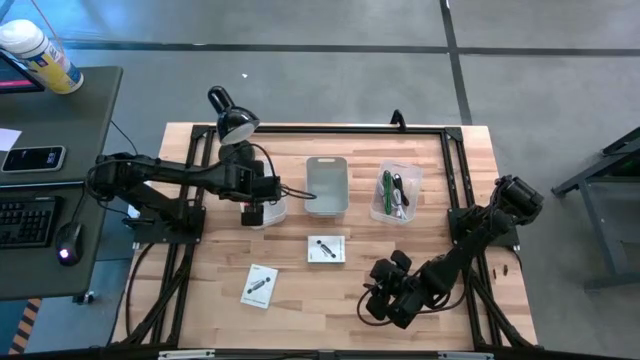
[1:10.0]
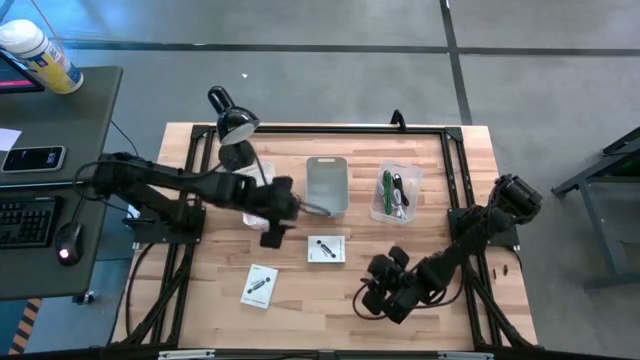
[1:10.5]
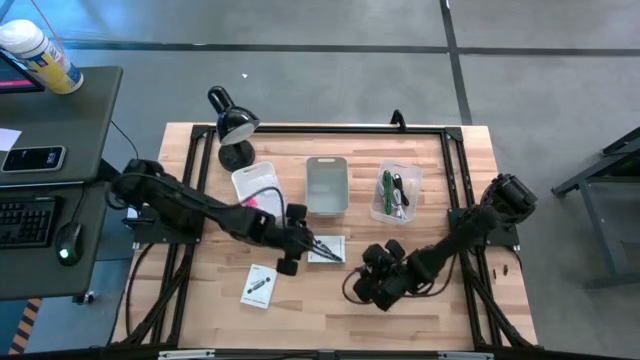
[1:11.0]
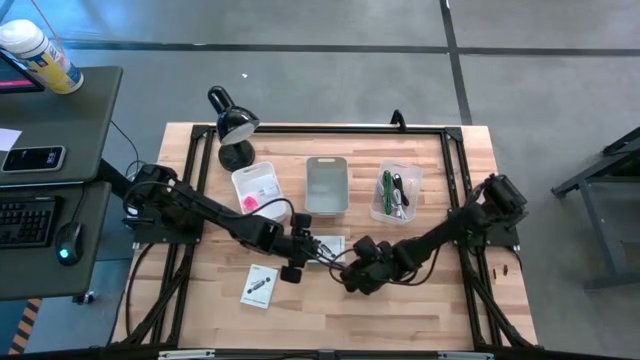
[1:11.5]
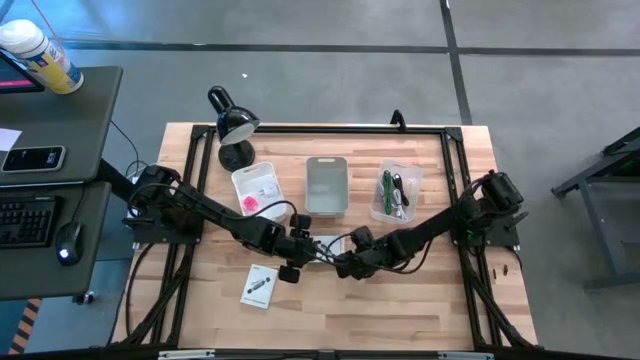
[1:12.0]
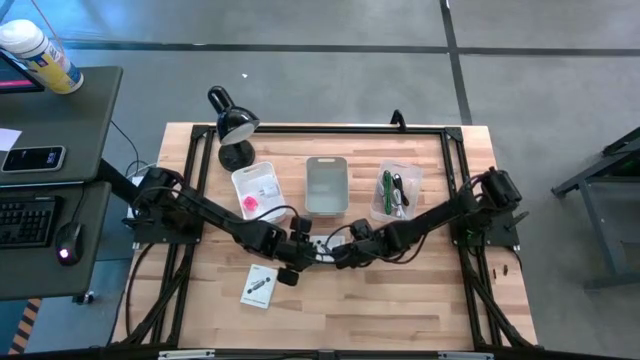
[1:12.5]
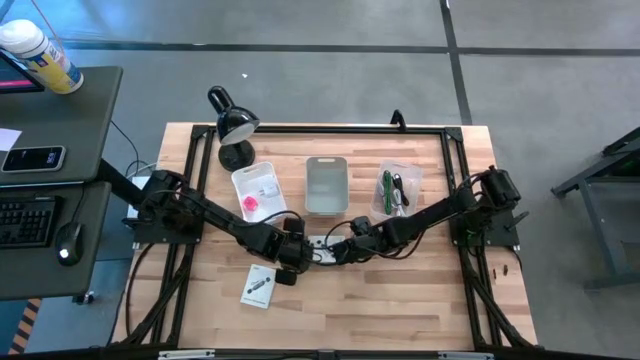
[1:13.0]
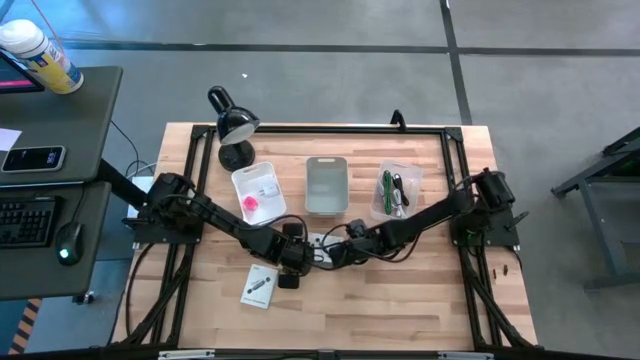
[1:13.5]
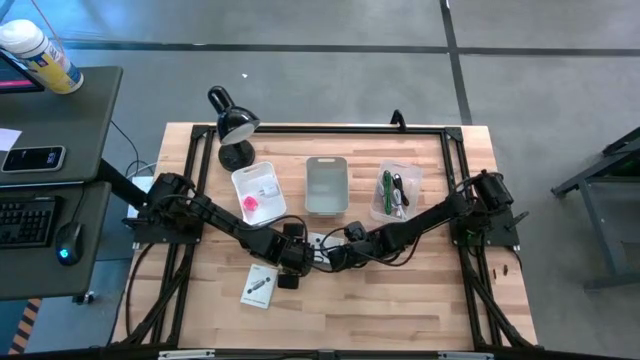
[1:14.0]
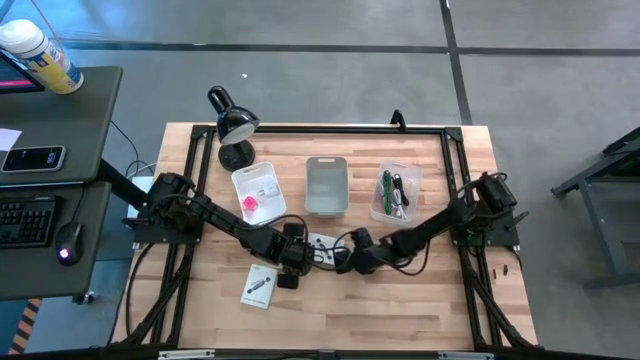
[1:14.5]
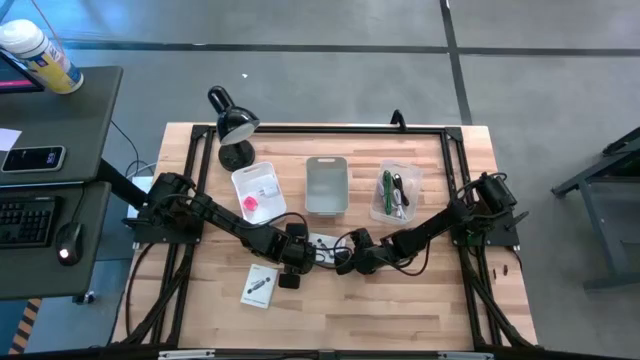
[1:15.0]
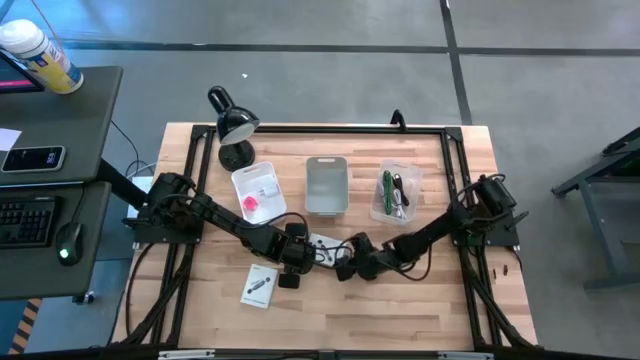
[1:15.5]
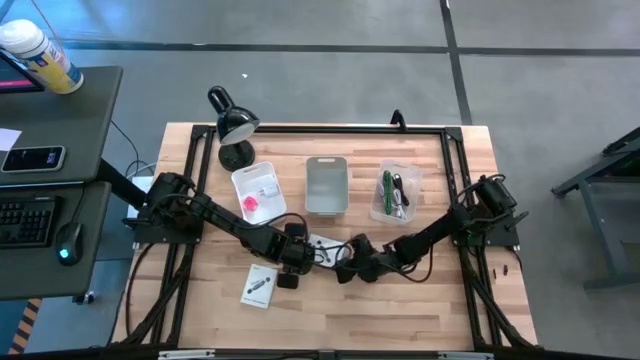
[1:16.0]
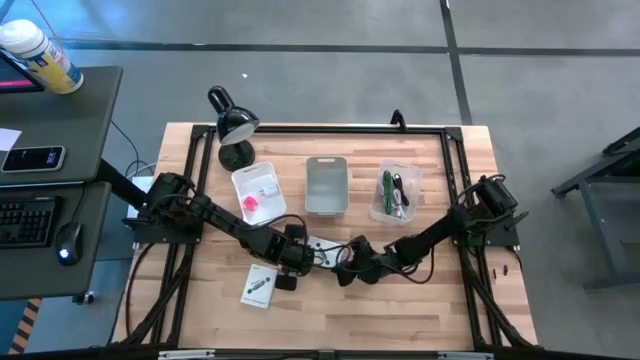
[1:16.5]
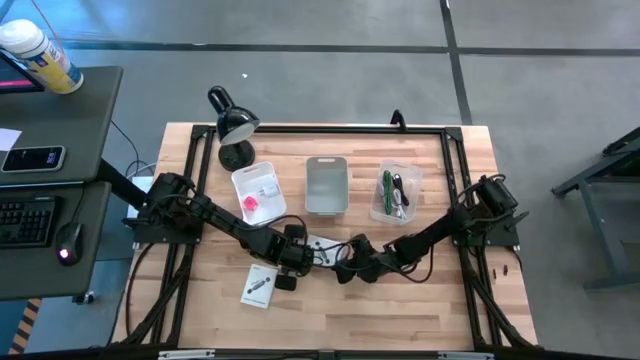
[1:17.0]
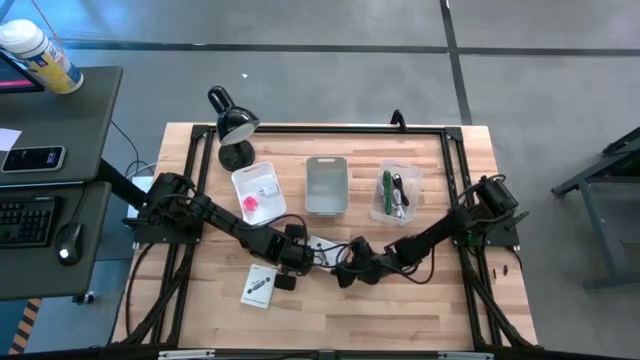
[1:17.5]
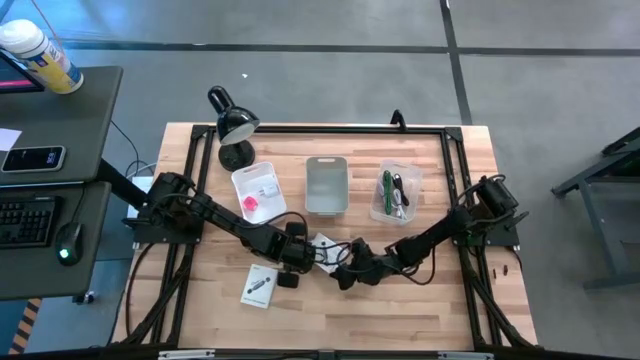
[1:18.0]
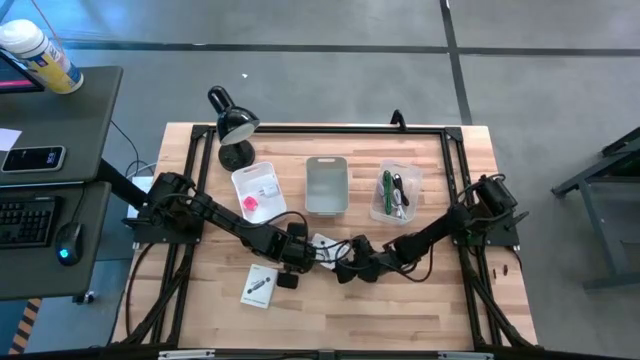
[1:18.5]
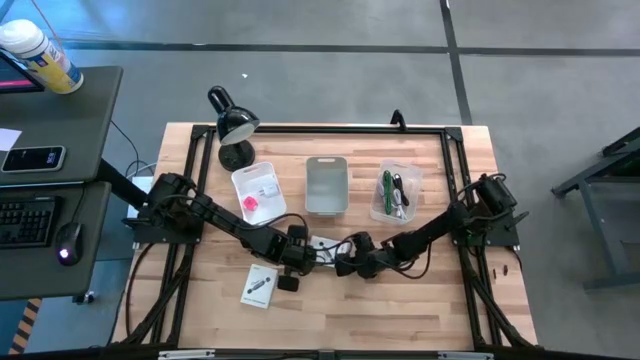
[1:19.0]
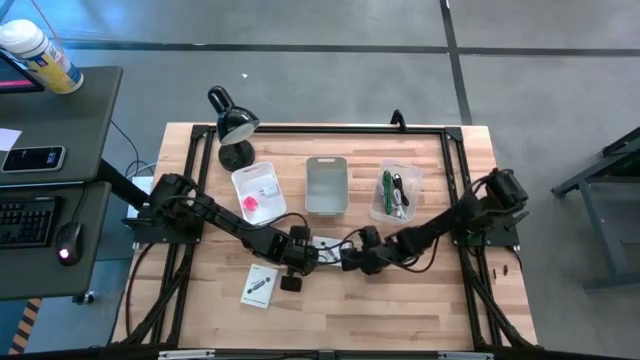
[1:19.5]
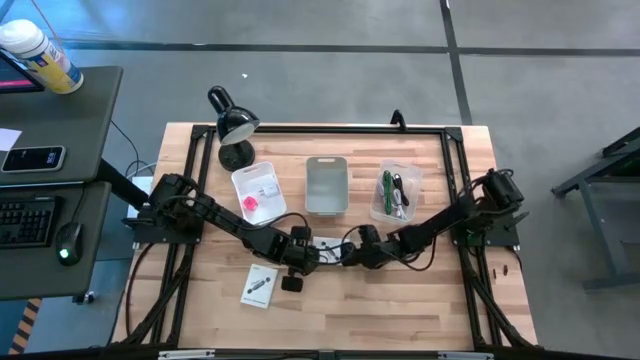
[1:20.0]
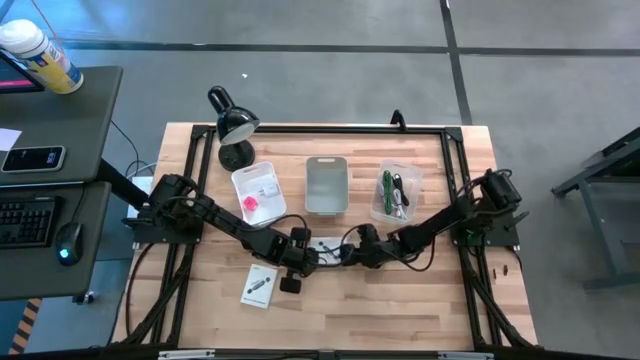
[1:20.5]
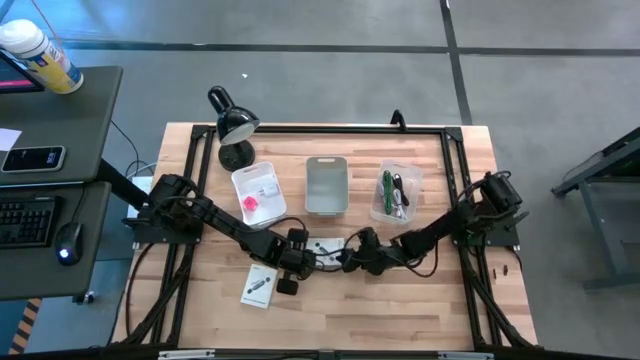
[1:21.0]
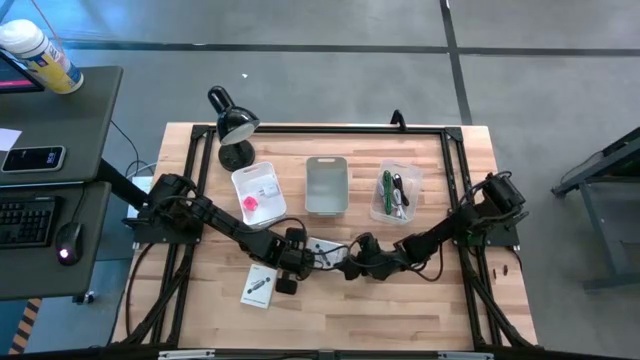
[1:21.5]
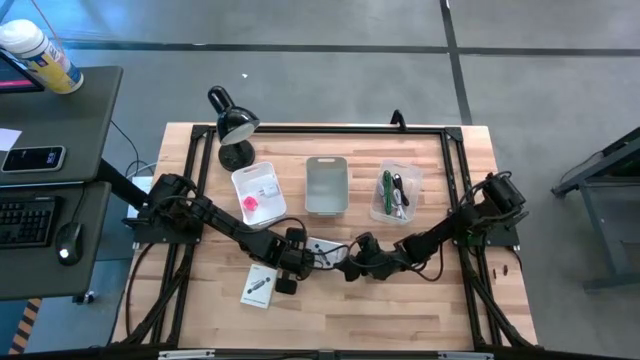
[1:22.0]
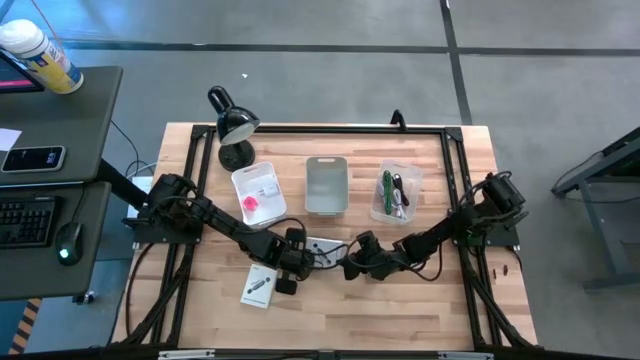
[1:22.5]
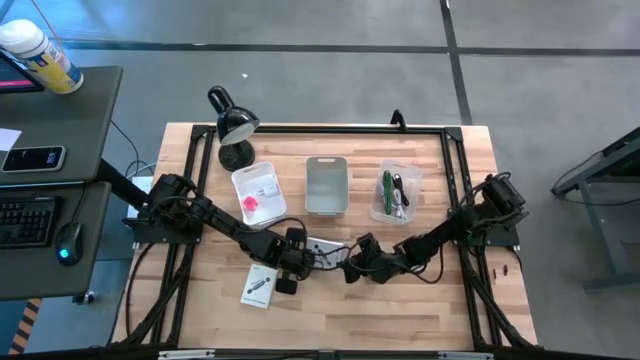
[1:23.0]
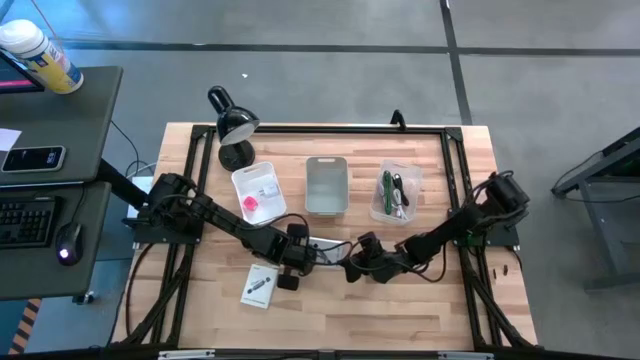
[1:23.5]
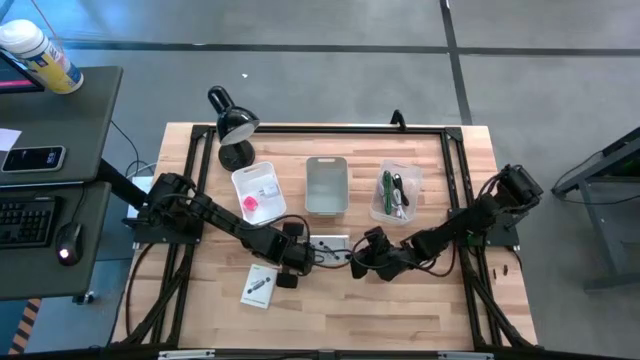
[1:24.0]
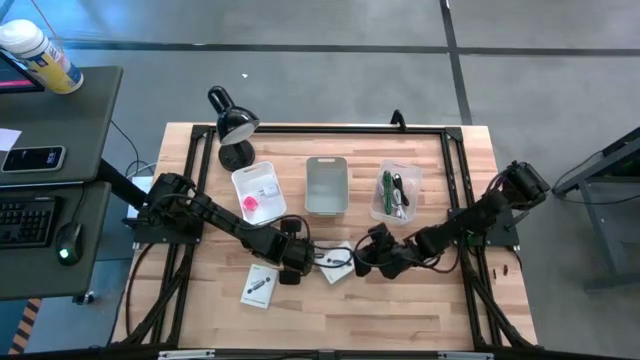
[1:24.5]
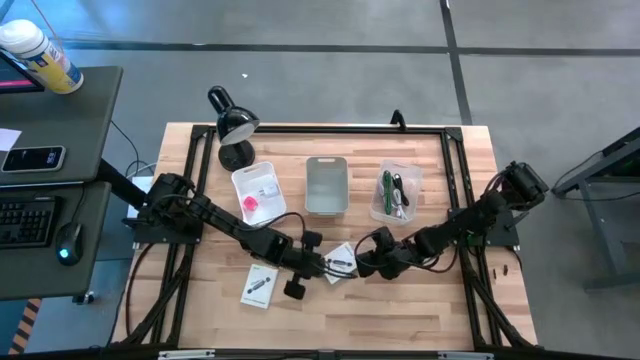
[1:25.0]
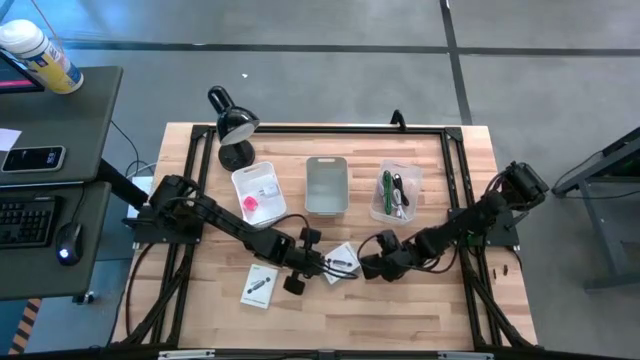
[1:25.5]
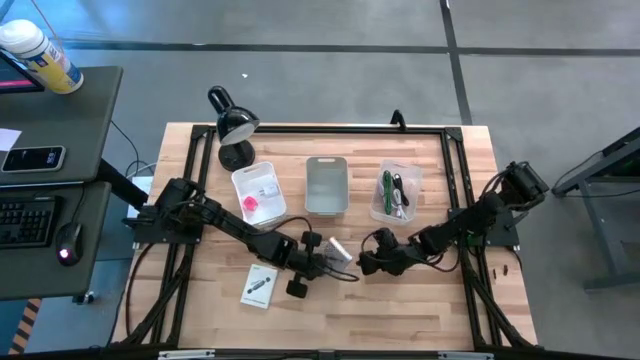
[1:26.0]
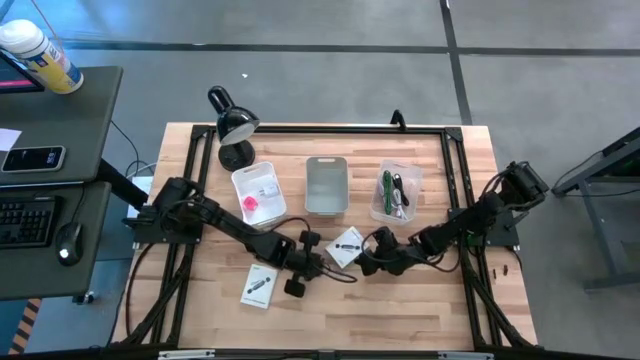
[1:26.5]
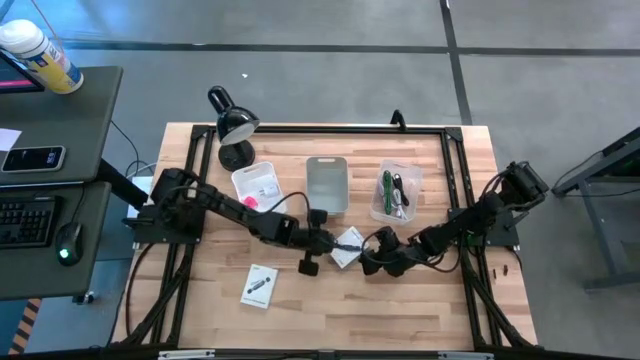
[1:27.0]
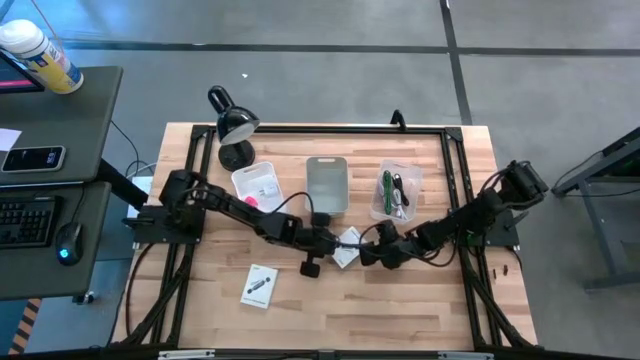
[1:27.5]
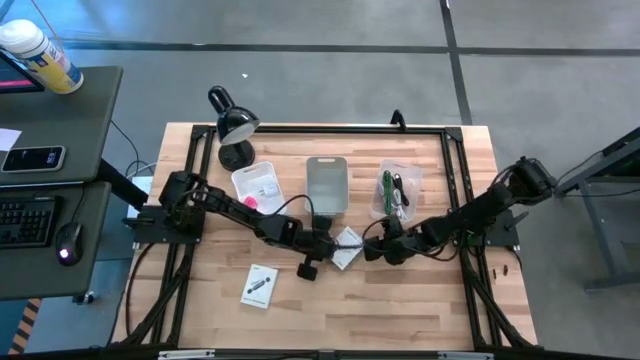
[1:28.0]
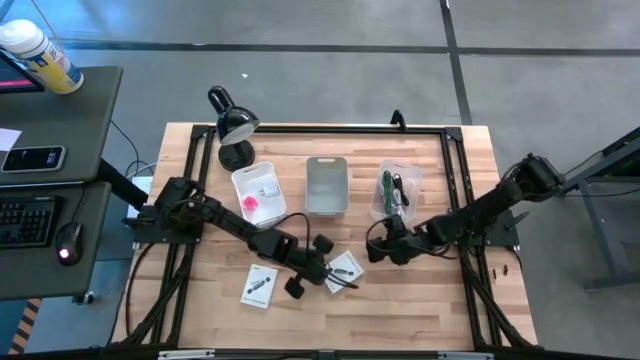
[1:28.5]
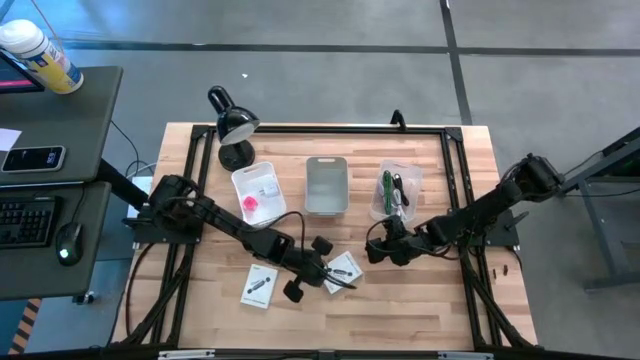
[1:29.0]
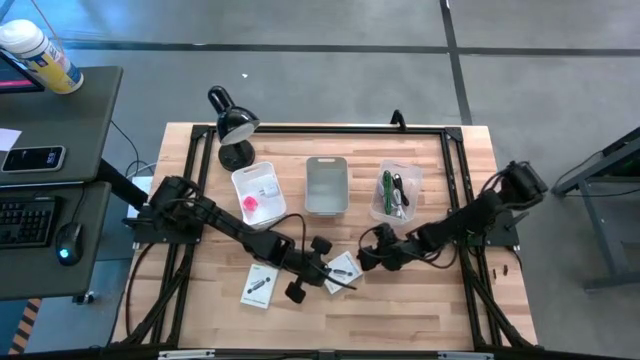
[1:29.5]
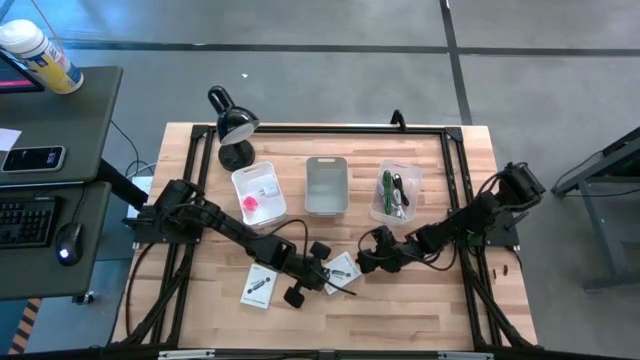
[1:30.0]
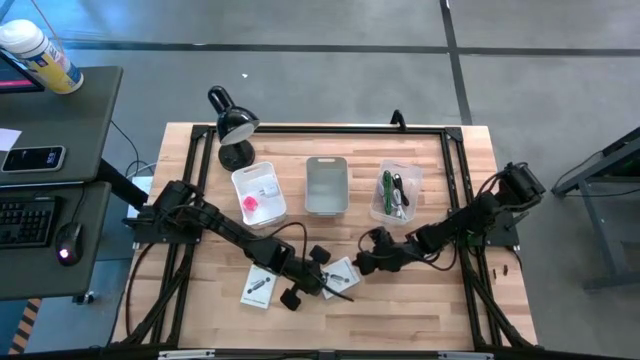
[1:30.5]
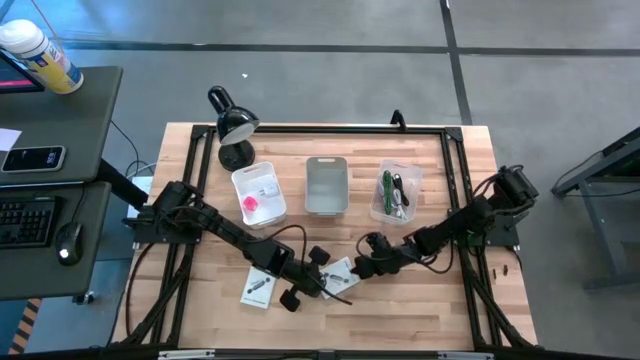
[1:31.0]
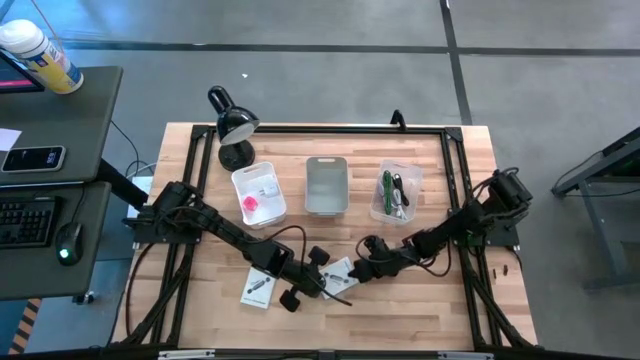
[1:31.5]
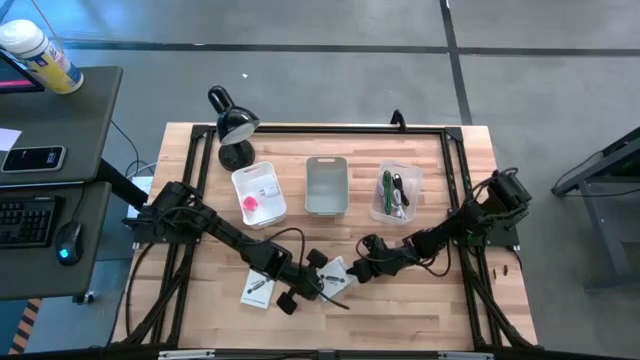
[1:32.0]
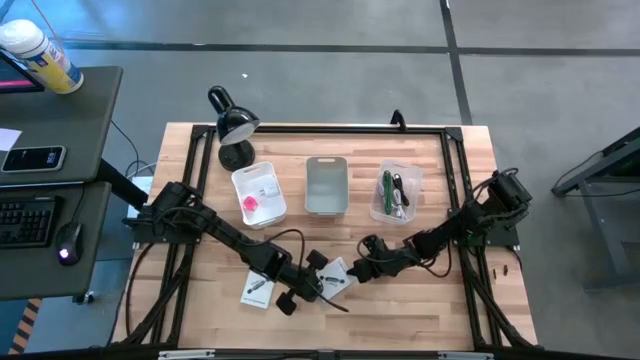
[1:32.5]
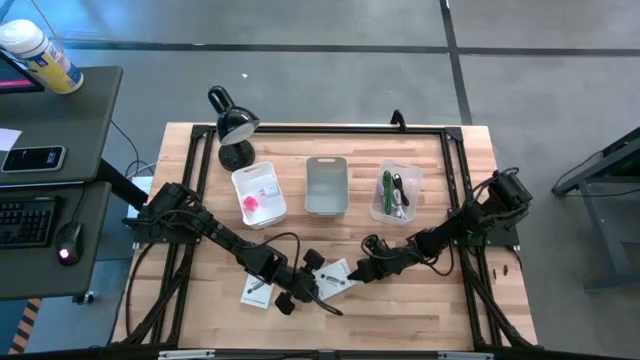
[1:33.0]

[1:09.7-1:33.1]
Task: Pick and place items into bin
Put the right white card reader box into the gray bin
